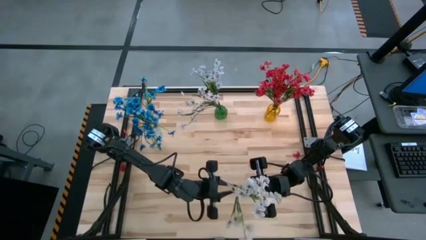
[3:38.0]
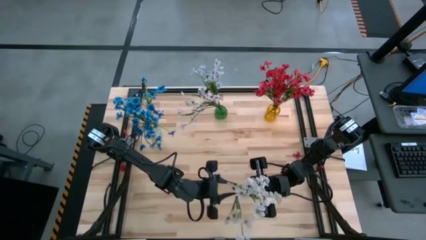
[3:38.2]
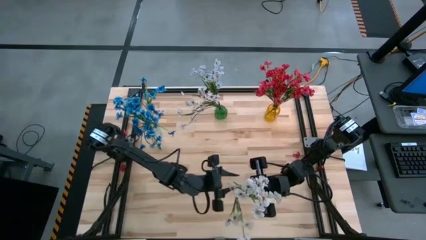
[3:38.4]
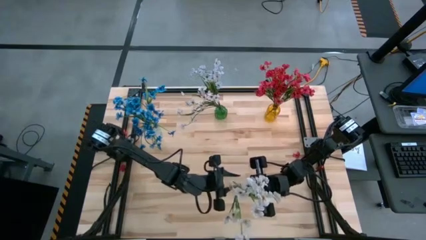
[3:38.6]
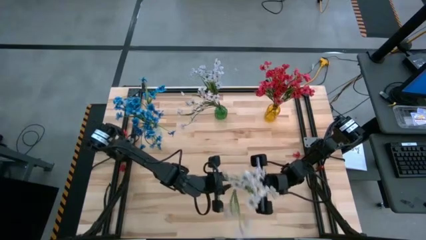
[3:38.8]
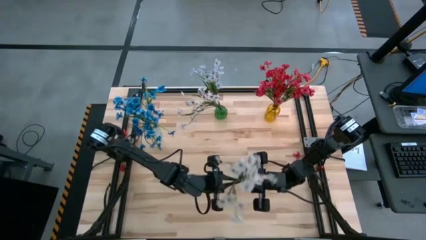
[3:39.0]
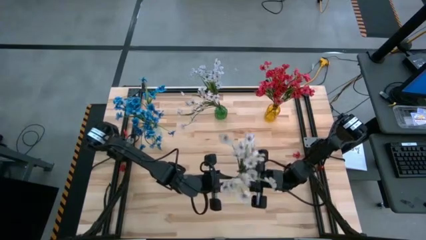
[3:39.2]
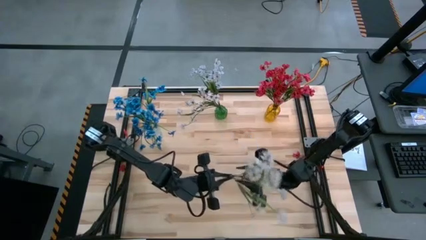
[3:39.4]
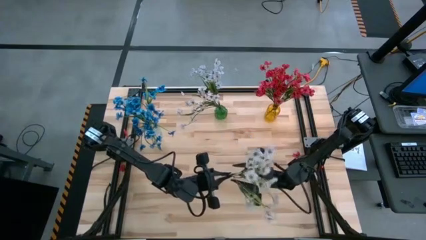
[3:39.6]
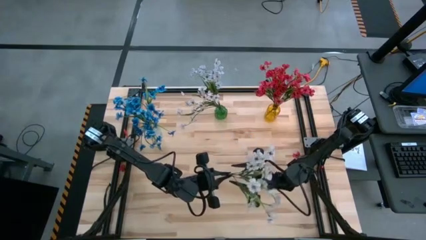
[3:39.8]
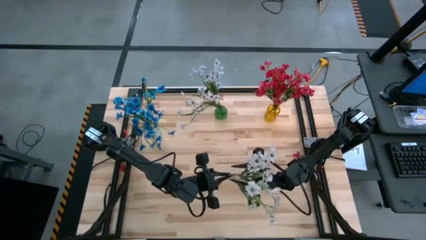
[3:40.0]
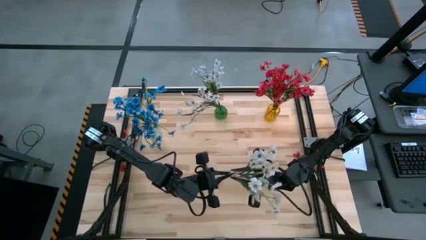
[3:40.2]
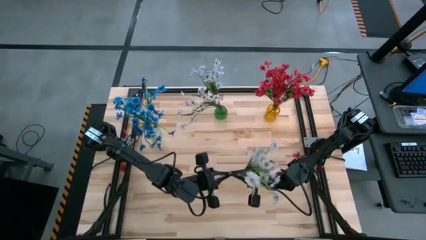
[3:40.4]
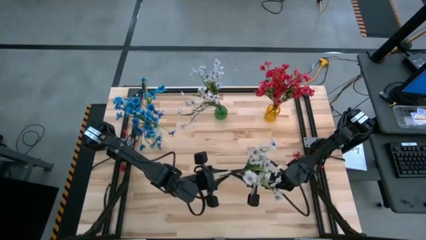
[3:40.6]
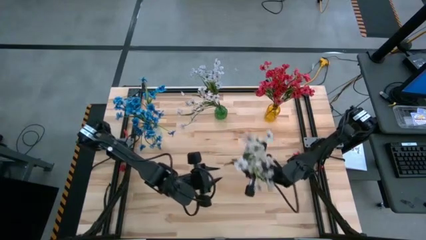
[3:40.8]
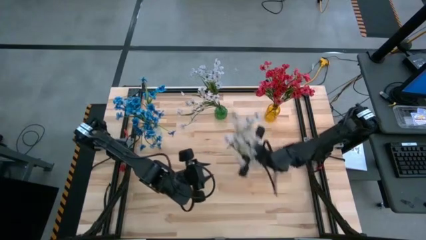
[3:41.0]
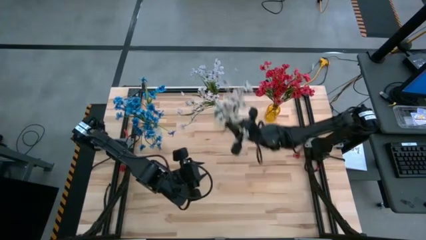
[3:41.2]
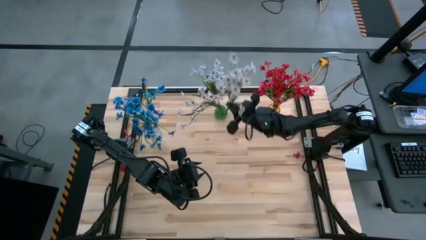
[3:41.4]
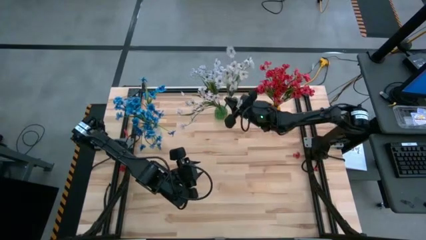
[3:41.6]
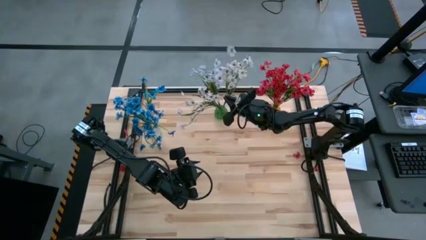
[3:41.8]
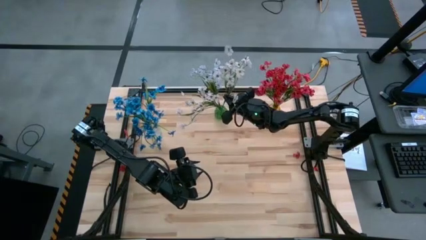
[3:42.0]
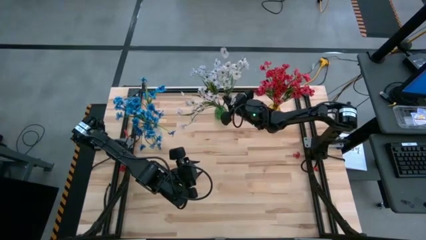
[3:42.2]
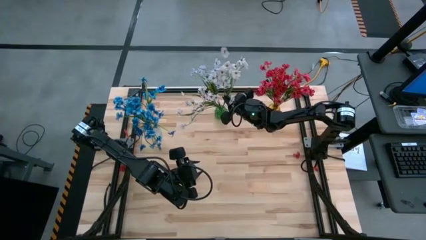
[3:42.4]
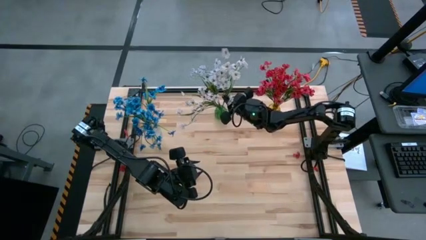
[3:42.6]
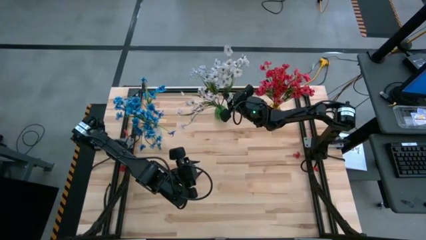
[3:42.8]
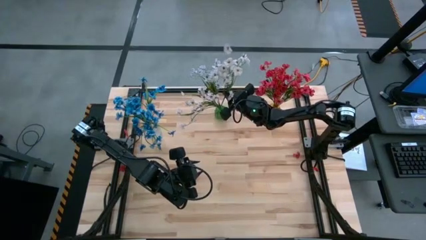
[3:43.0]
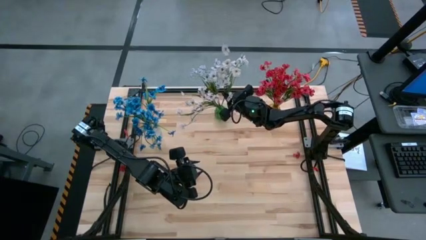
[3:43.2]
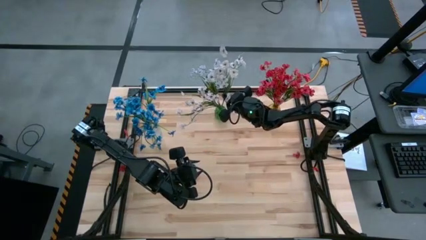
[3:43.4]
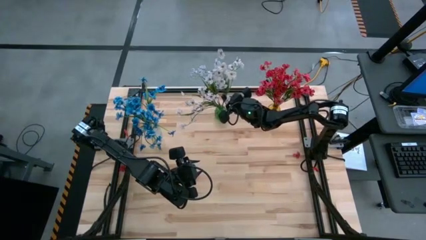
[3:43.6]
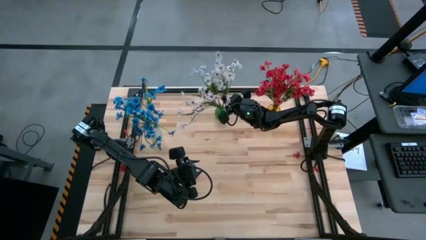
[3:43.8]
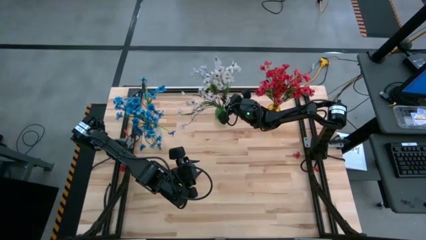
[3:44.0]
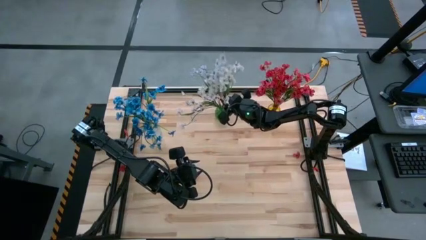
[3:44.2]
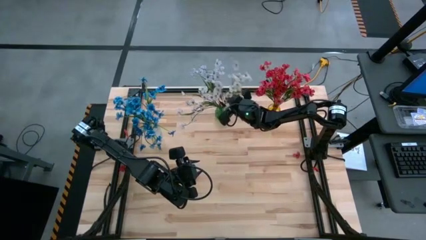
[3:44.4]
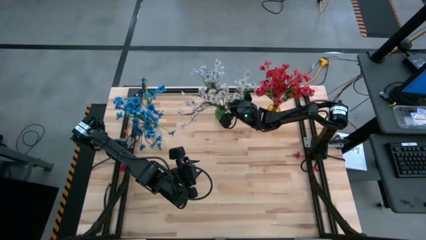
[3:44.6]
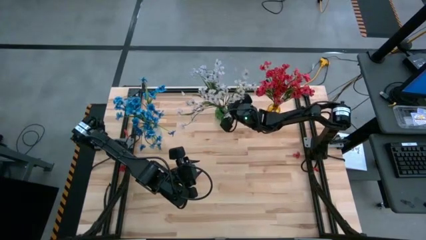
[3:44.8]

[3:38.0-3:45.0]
Task: Sort flowers into vase by color
Put the white flowers into the green vase

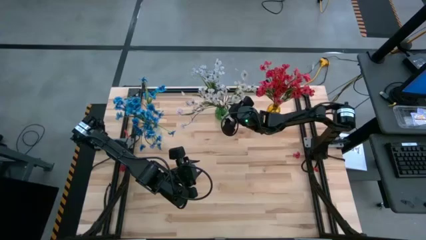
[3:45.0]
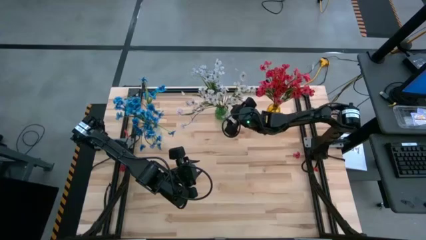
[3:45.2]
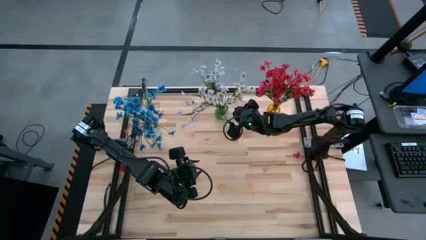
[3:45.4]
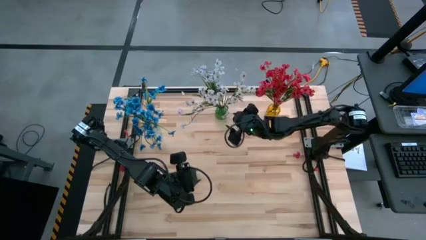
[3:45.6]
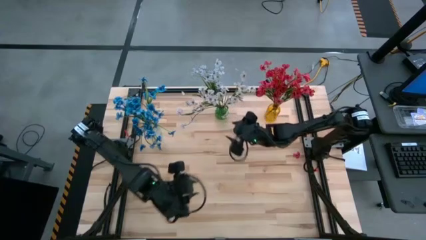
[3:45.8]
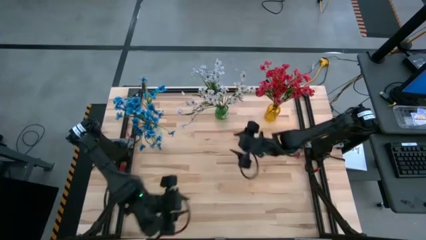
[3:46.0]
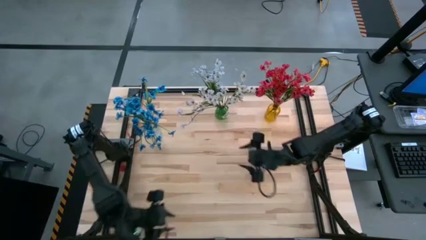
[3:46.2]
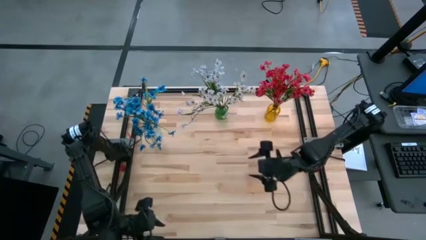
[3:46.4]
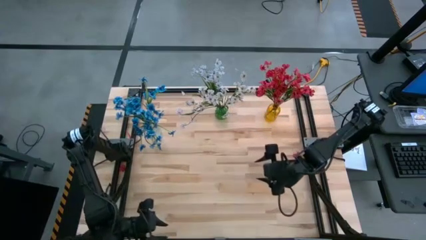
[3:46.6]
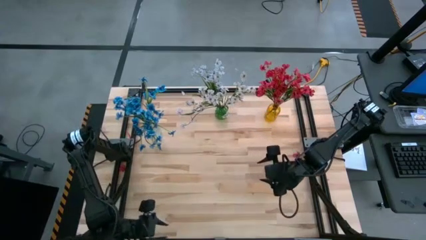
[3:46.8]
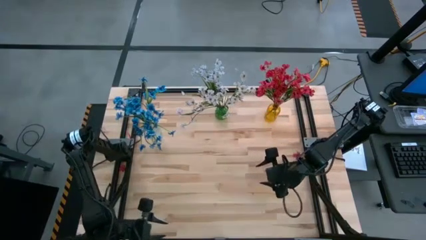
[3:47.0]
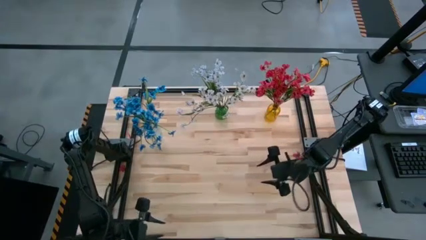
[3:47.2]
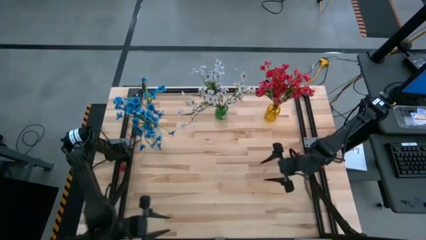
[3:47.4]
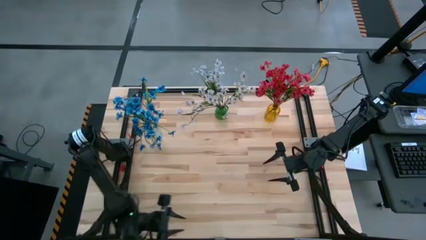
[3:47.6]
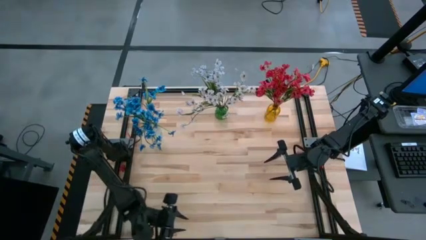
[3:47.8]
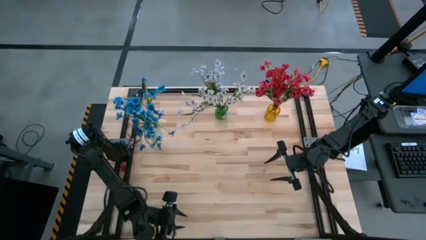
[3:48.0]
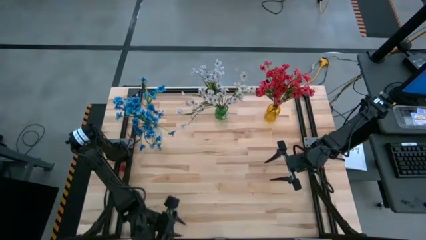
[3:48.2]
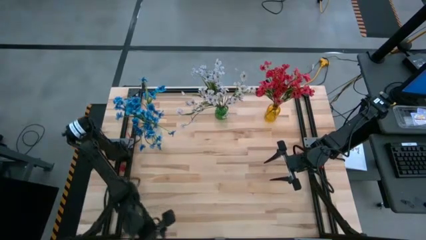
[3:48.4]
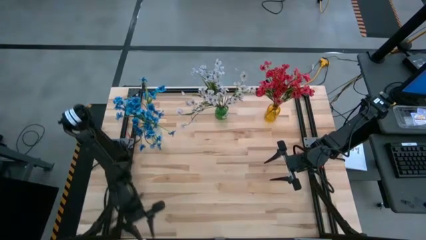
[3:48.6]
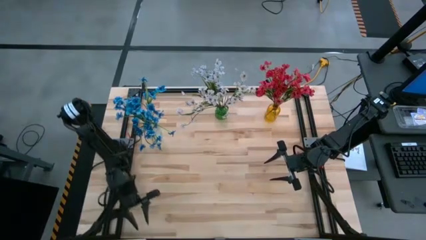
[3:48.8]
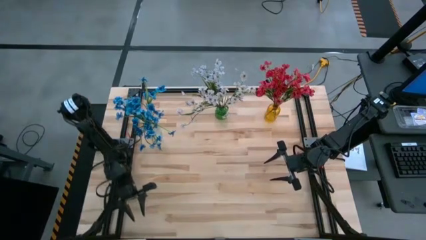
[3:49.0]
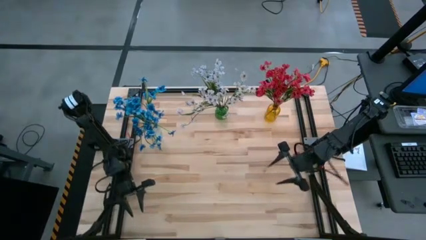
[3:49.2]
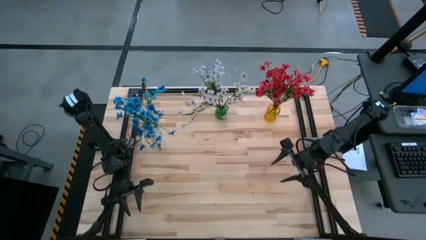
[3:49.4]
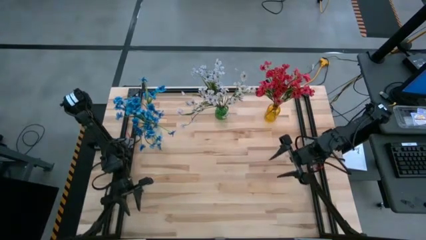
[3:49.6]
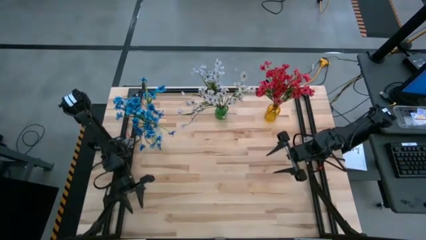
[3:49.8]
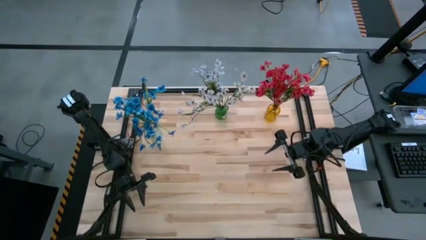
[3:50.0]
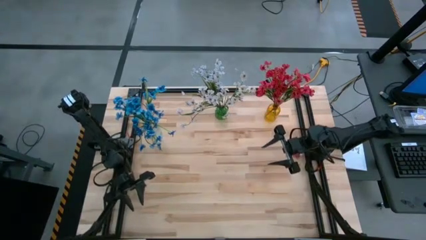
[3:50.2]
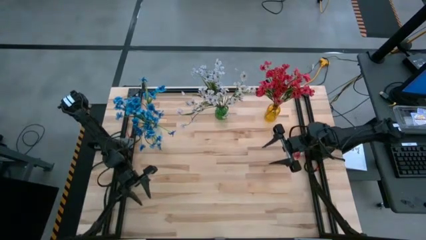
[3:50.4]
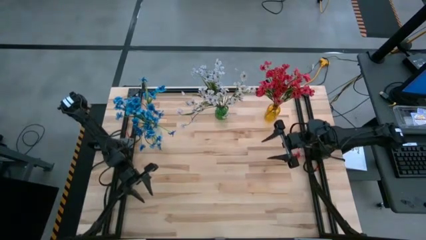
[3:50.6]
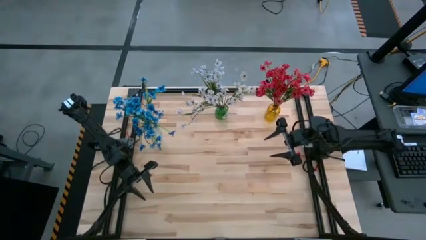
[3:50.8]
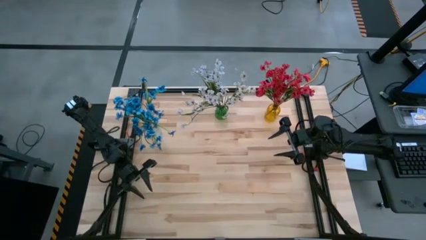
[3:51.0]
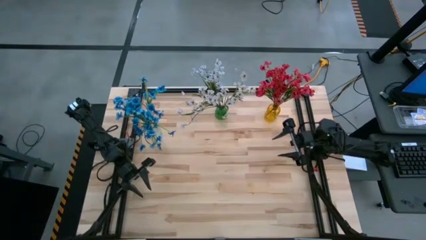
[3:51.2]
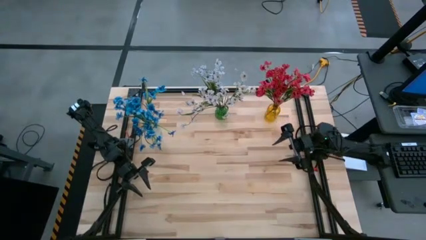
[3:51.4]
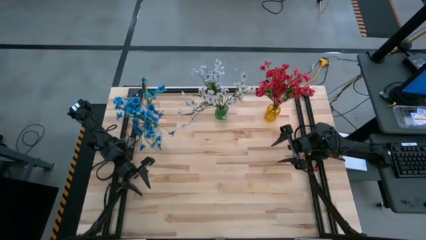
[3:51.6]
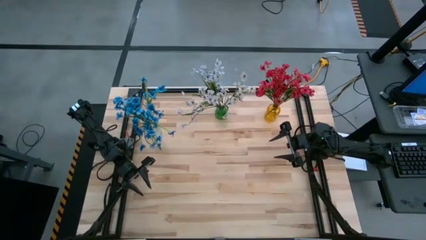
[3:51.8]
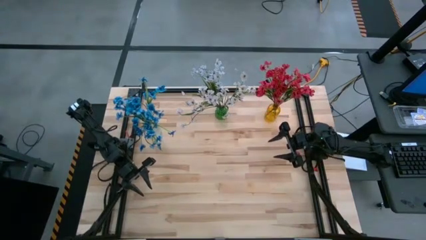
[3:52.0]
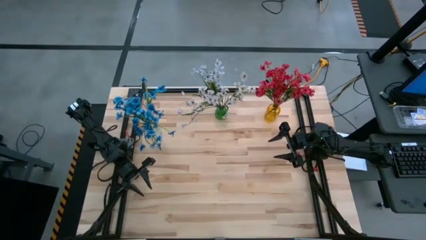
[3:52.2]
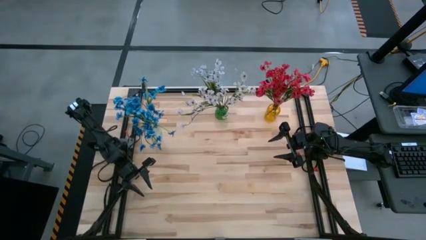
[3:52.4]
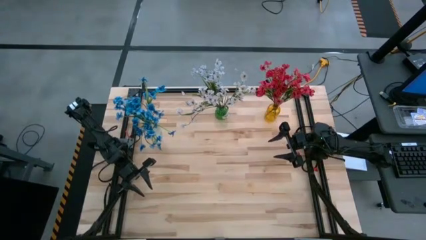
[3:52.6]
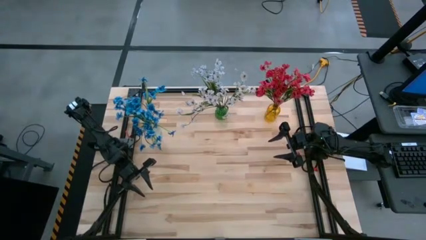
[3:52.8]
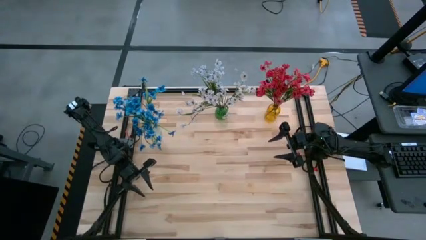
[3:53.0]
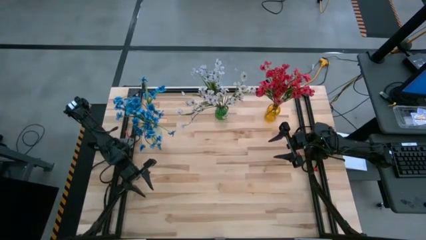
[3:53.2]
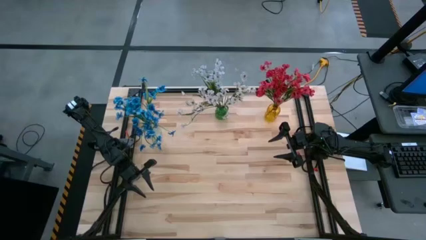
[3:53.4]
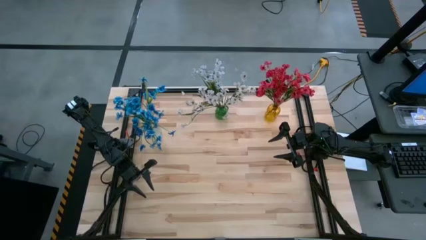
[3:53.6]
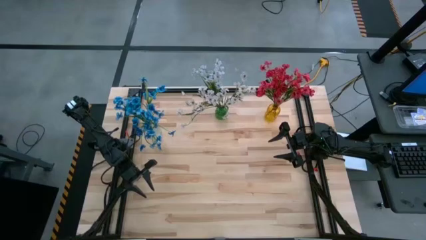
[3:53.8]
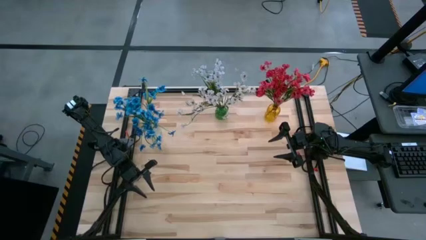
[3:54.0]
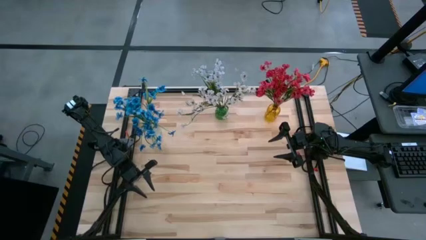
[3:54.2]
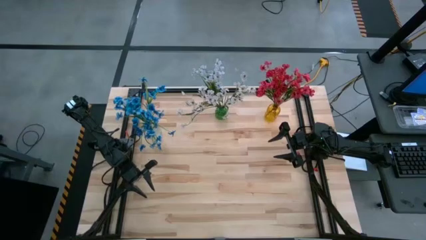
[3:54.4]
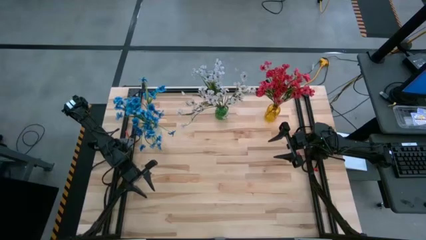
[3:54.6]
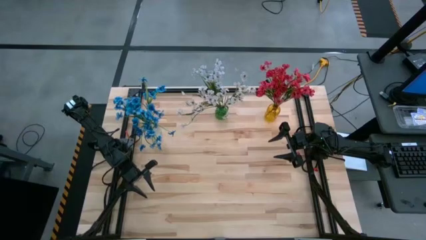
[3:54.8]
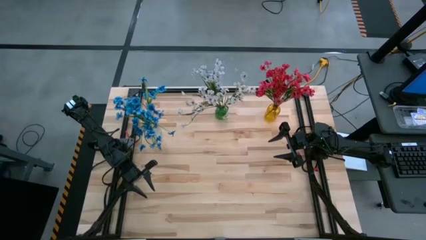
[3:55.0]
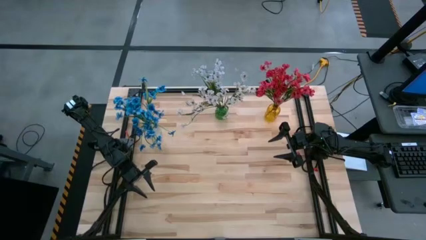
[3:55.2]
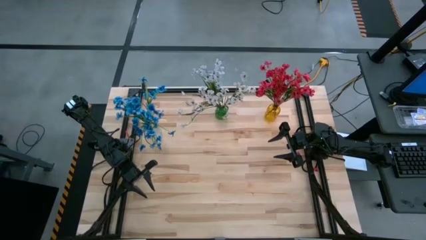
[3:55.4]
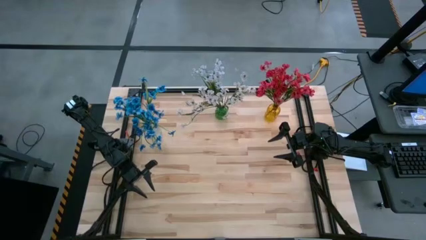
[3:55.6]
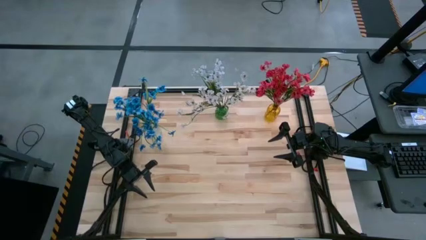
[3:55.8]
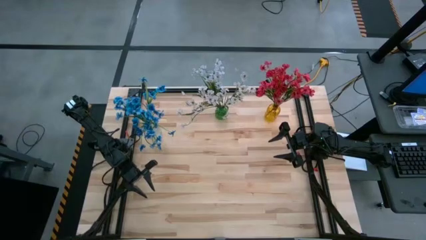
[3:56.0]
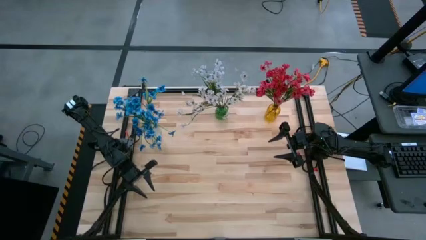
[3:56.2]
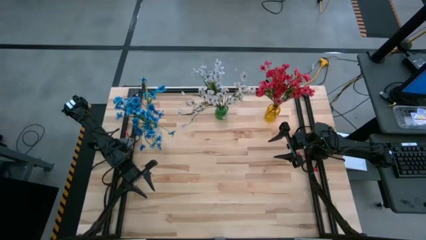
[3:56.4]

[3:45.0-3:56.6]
Return to Home Position
